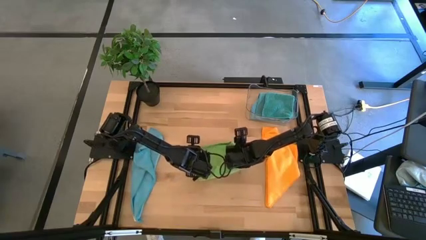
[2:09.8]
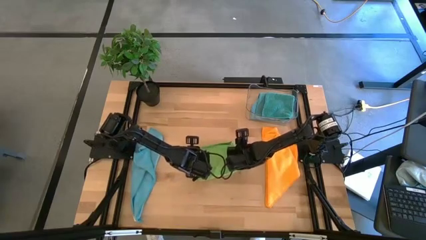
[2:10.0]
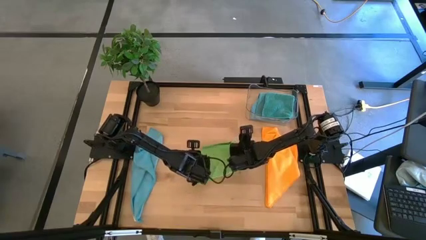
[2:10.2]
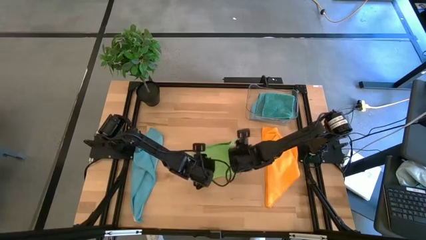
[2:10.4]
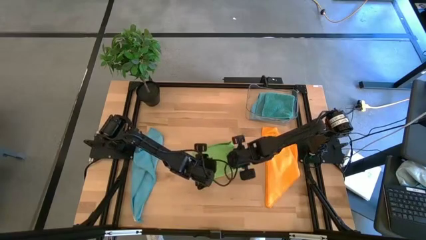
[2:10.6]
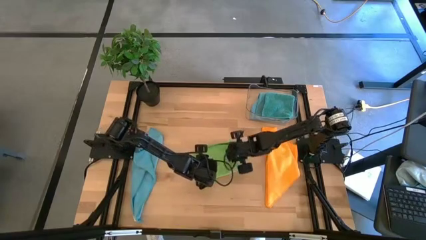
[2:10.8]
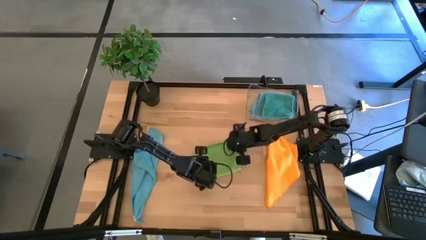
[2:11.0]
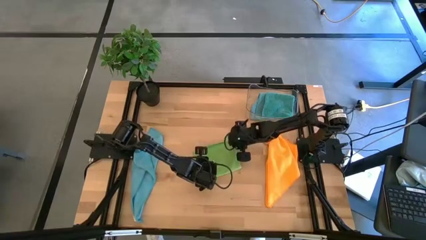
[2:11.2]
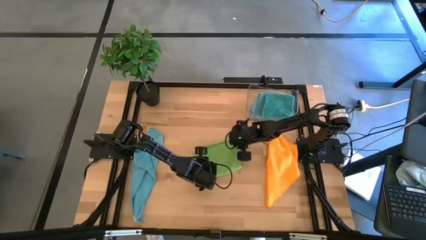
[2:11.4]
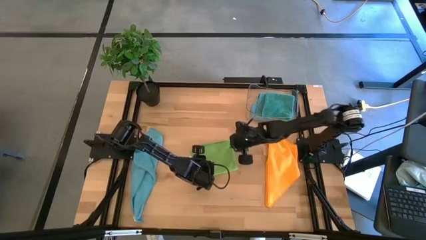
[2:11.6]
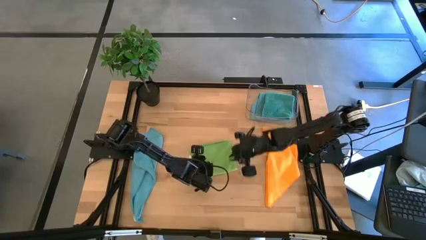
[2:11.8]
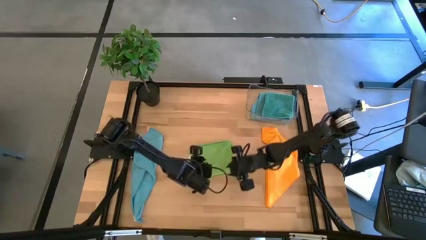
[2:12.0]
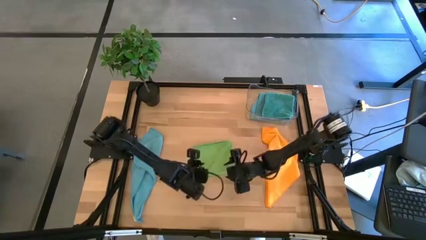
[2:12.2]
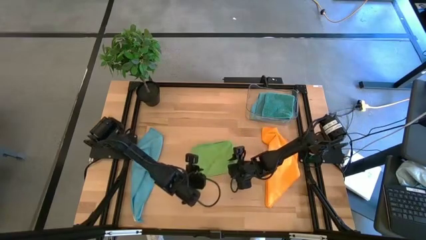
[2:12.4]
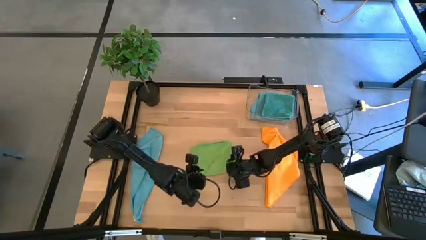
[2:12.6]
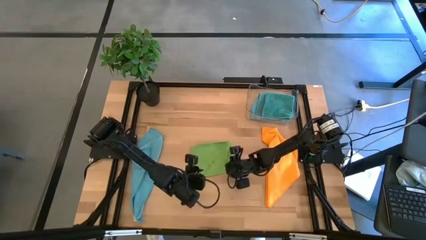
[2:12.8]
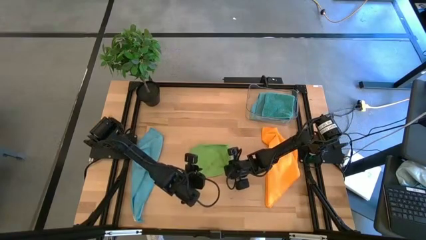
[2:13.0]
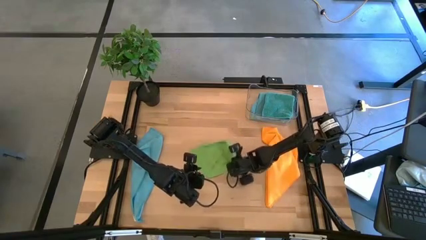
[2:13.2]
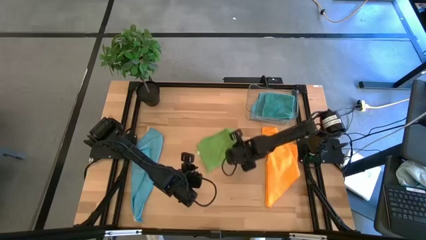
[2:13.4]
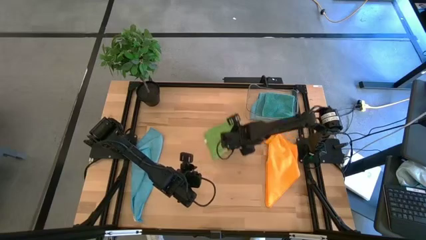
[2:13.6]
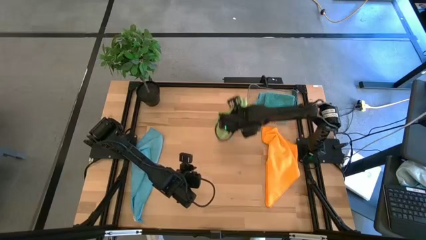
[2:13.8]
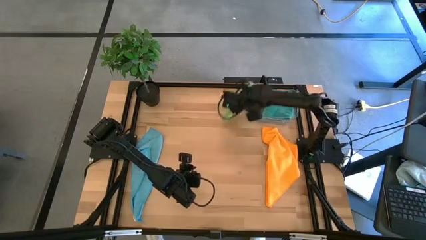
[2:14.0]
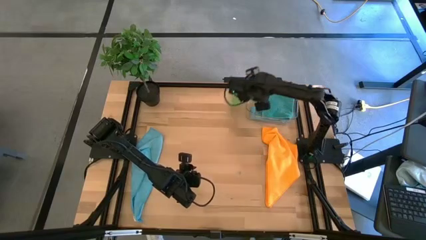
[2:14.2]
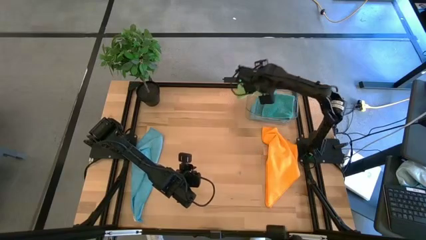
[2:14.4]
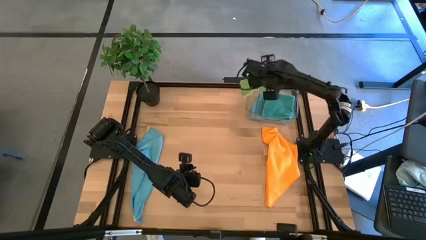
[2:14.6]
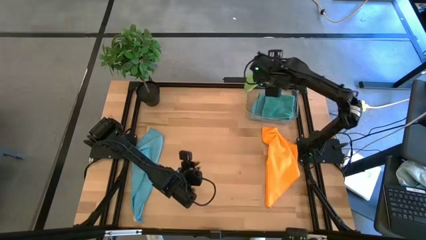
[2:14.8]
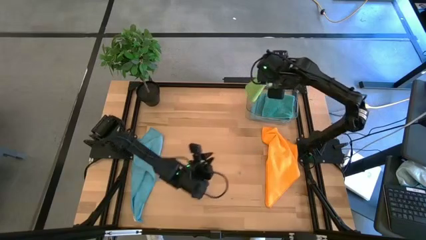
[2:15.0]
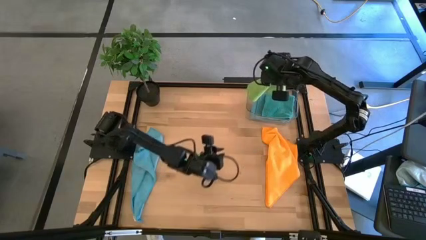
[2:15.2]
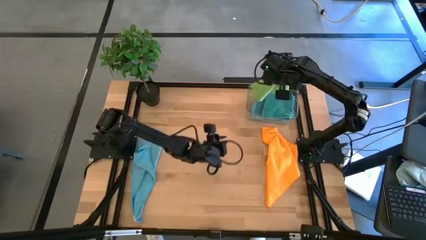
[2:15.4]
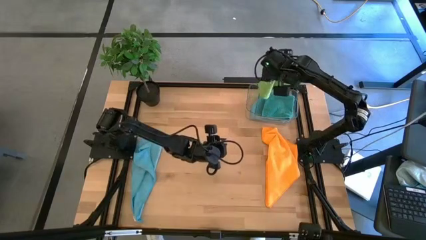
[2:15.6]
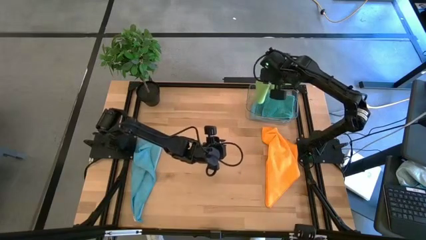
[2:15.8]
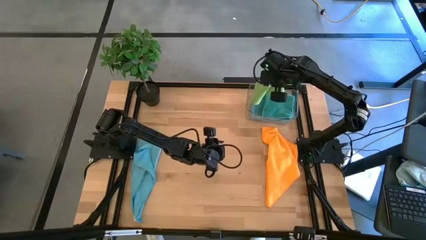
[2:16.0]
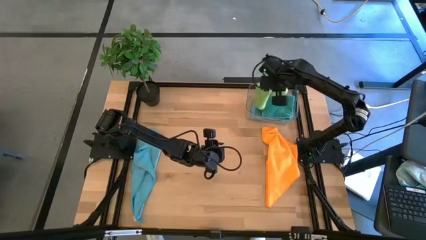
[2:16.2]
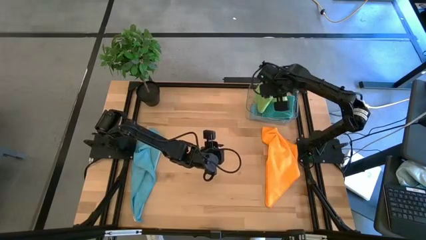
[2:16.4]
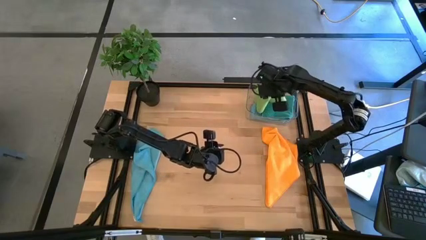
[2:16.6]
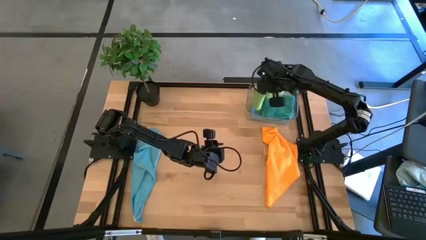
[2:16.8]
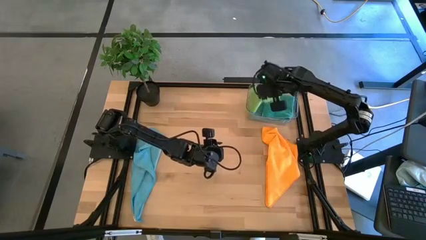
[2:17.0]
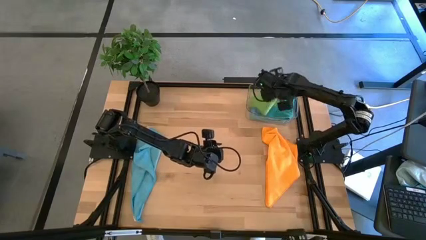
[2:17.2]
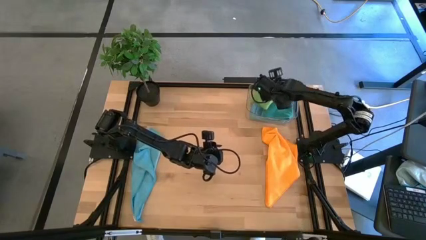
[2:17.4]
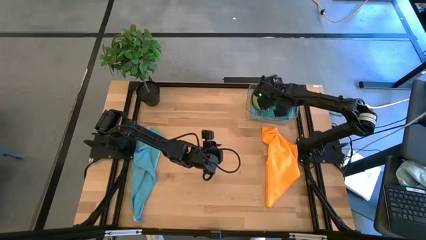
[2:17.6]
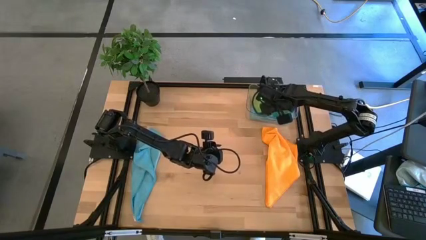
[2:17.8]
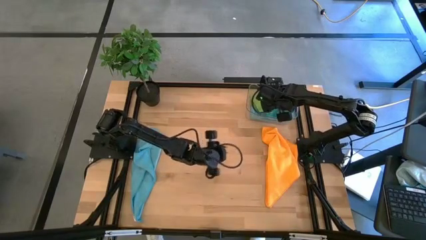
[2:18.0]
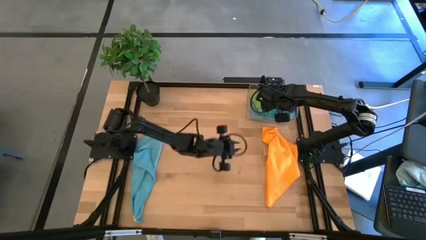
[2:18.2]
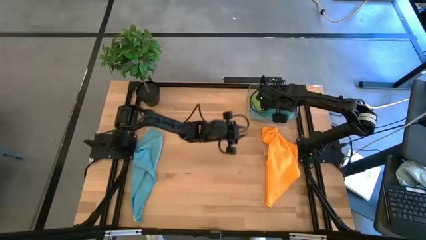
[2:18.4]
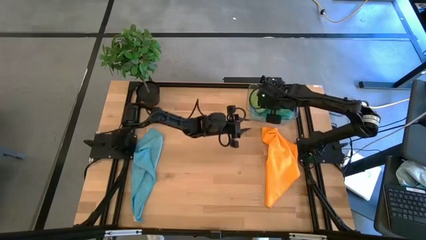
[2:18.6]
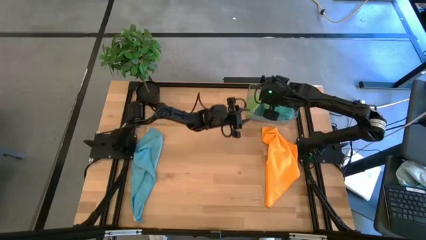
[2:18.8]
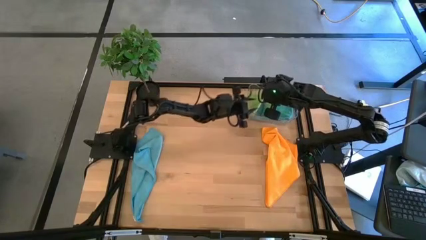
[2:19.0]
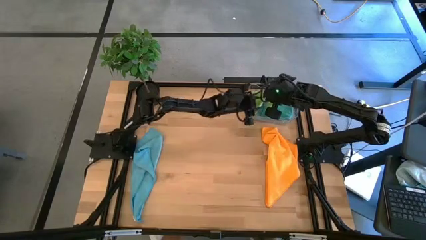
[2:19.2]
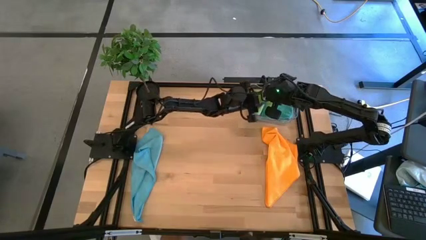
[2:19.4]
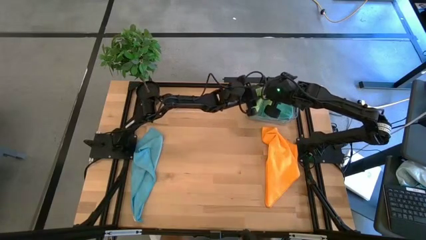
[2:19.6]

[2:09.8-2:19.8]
Task: Fold microfiber towels
Put the folded green microfiber towel into the transparent bin

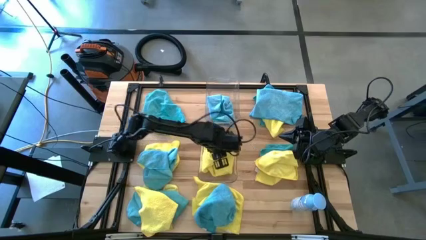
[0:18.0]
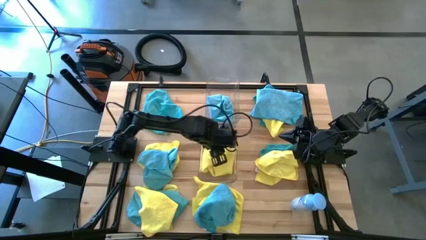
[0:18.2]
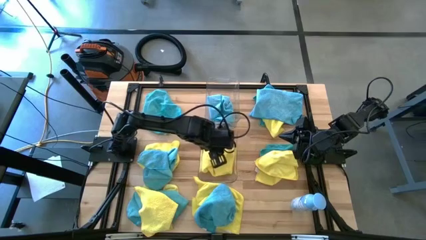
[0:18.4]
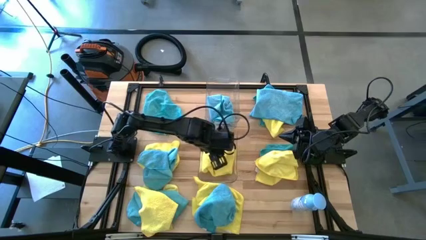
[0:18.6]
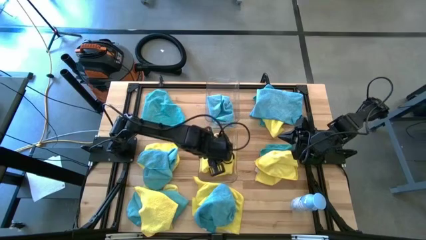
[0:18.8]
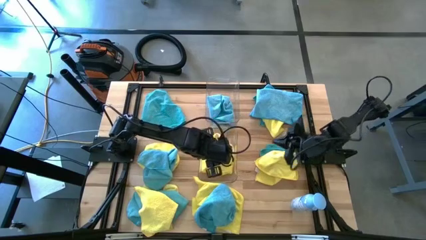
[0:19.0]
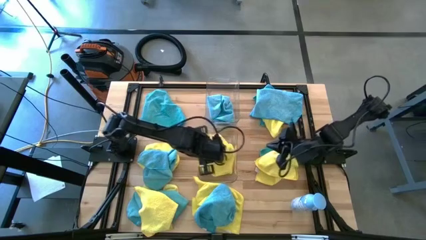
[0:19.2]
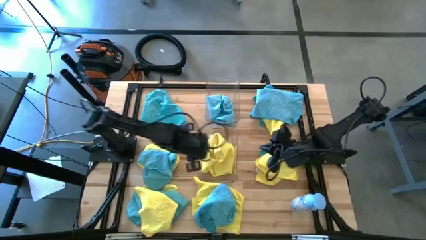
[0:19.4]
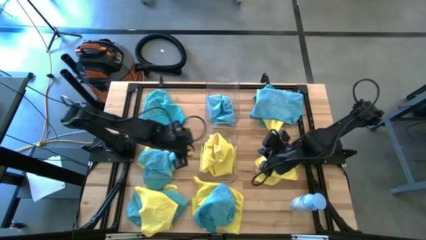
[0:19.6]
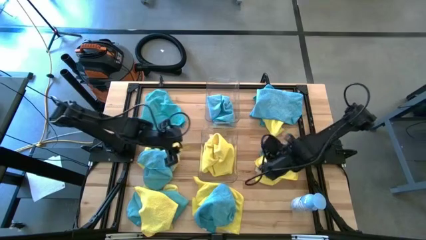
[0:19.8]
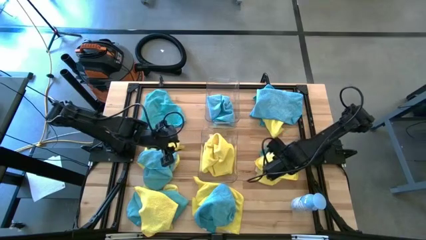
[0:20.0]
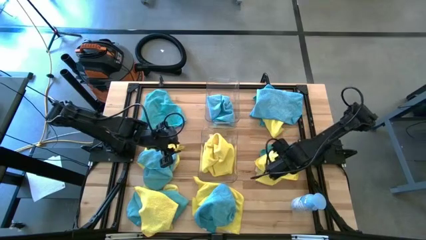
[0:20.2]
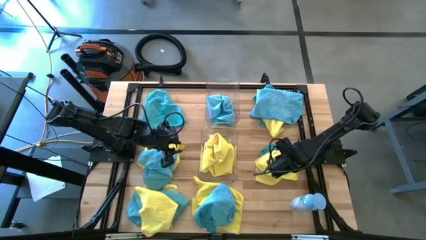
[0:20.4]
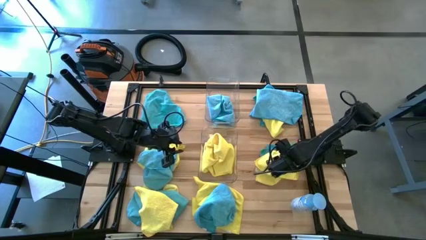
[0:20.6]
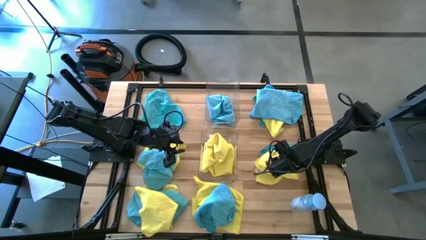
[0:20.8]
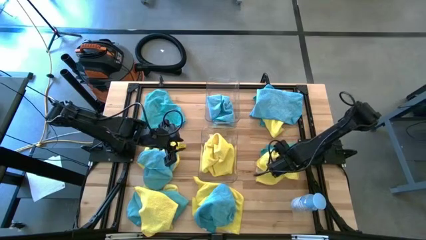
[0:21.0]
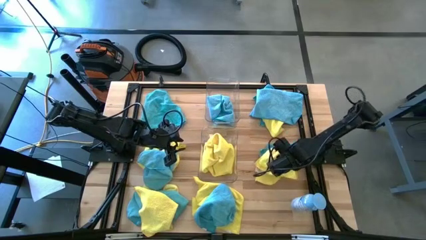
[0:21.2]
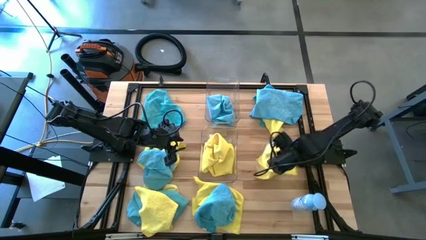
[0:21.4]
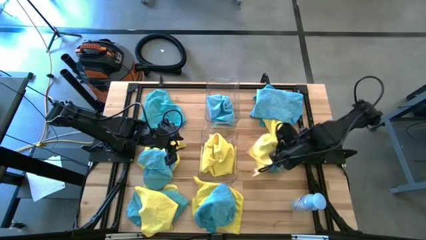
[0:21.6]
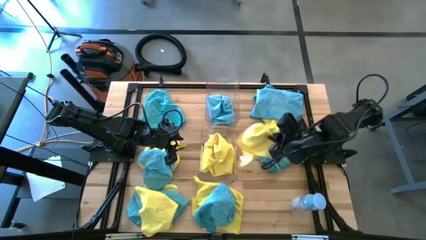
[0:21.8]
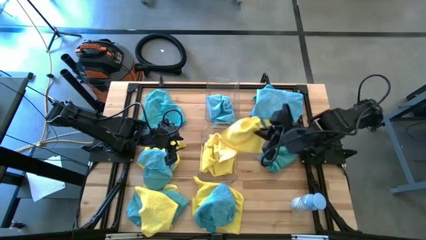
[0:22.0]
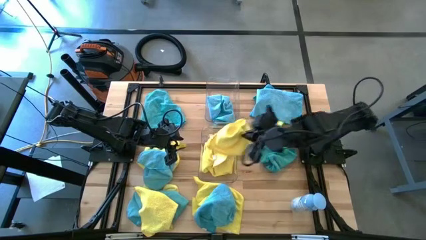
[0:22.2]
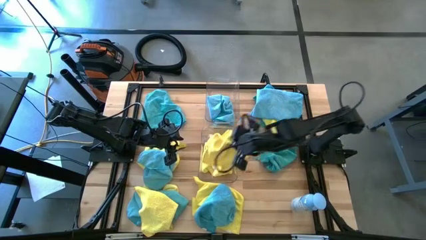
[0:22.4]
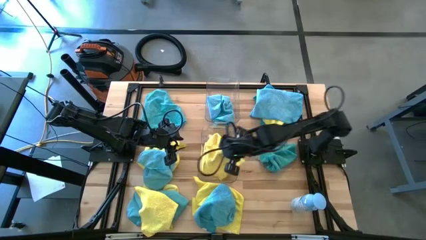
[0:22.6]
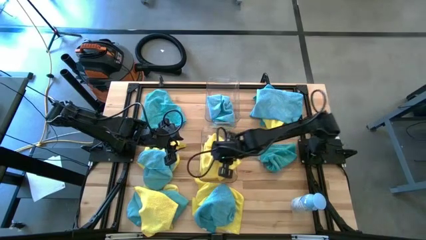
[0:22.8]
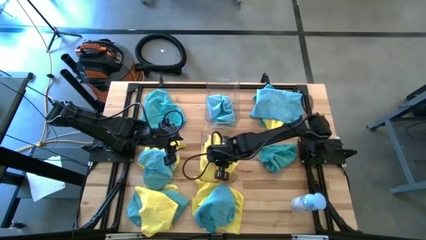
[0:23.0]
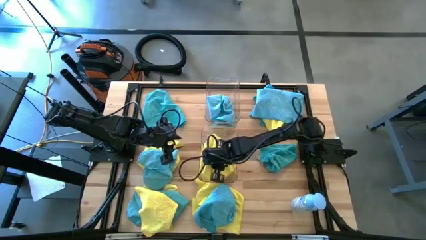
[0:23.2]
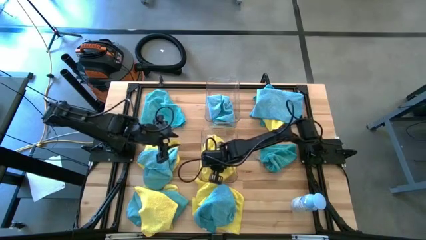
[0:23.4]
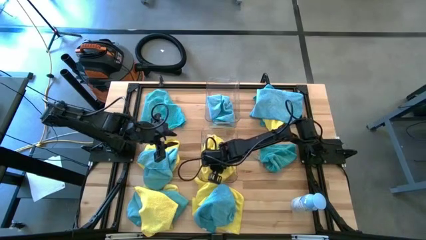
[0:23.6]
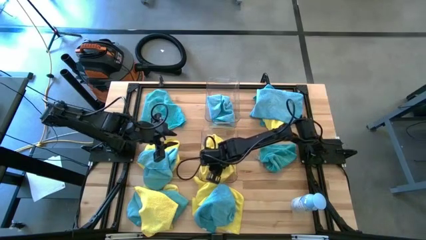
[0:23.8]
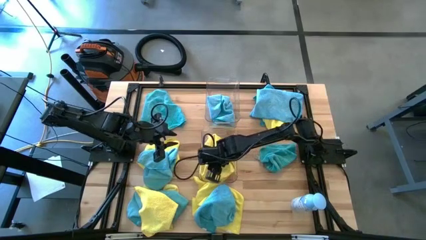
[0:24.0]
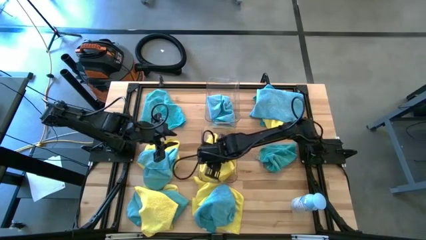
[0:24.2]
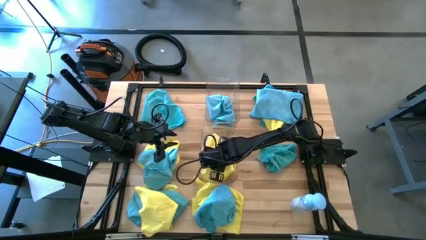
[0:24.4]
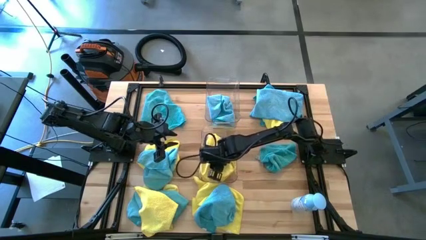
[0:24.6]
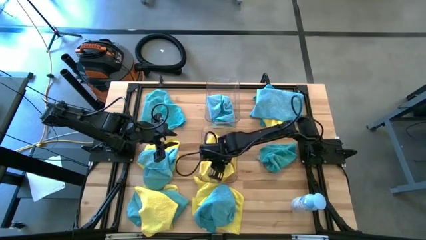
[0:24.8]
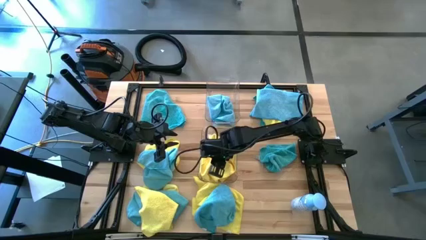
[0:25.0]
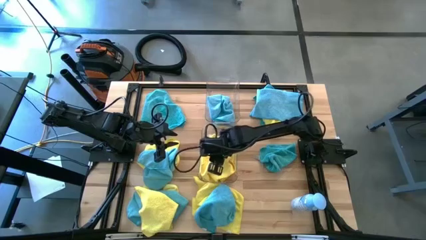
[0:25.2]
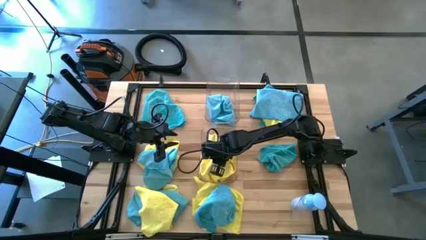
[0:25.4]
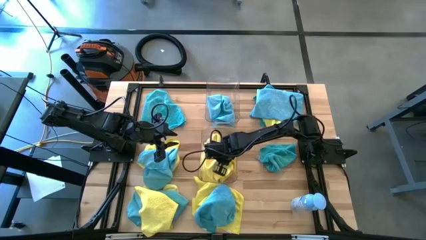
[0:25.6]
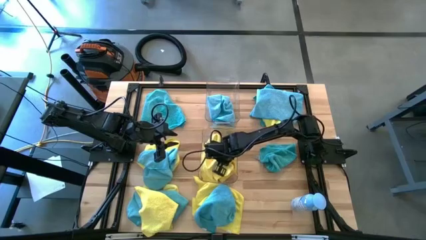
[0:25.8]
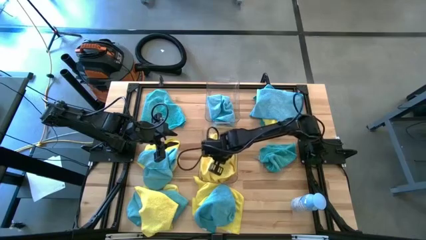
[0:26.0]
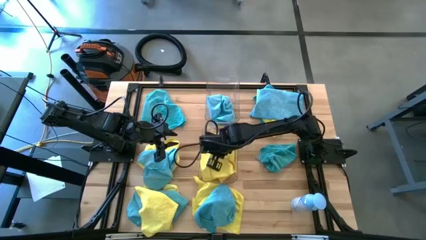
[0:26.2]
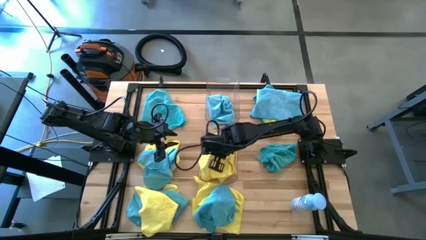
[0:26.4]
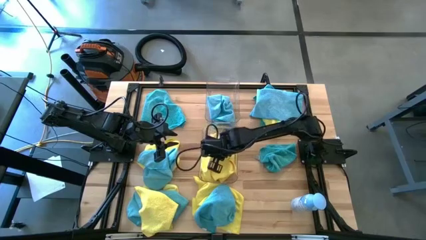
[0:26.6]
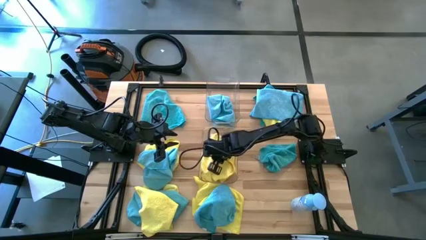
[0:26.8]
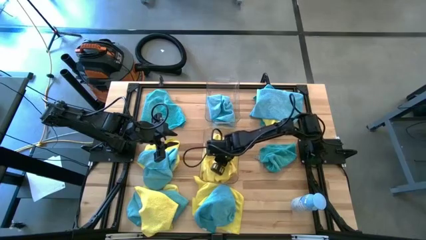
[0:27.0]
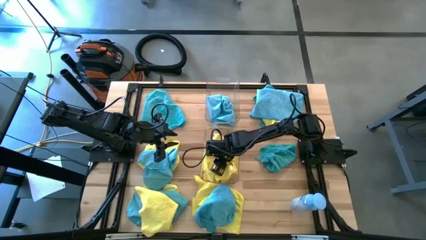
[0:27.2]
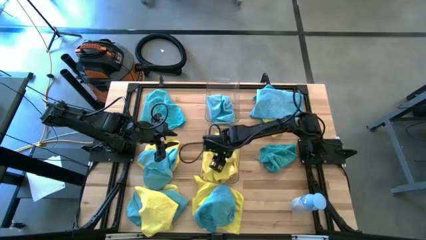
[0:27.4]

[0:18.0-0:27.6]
Task: Sort microfiber towel by color & place in baskets
Put the yellow towel into the bottom transparent bin
